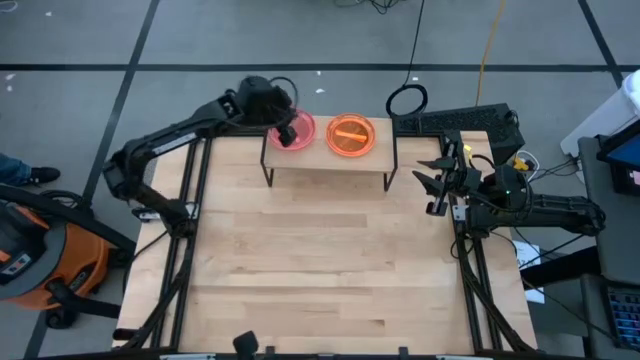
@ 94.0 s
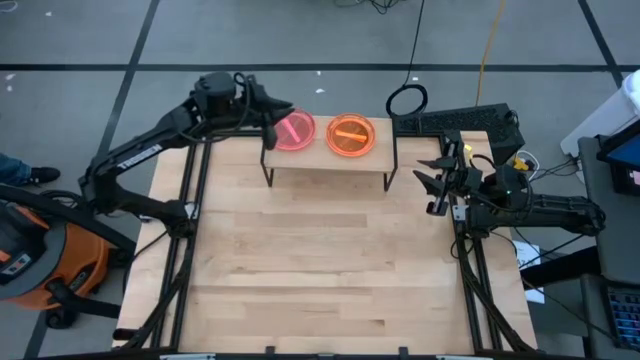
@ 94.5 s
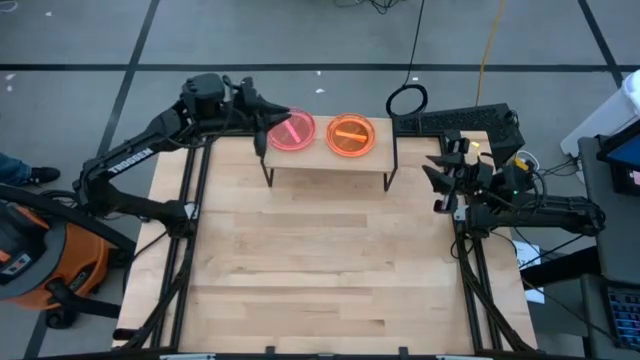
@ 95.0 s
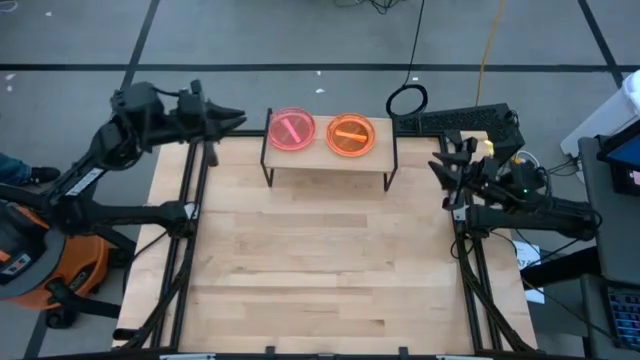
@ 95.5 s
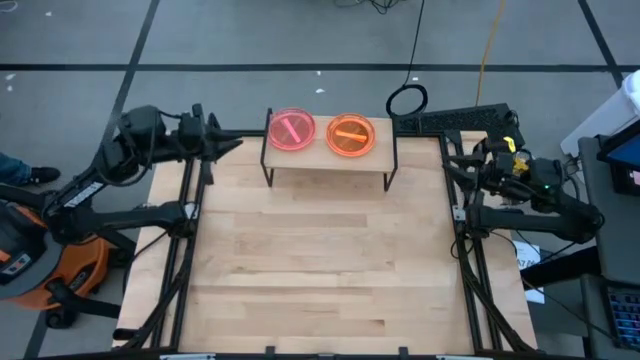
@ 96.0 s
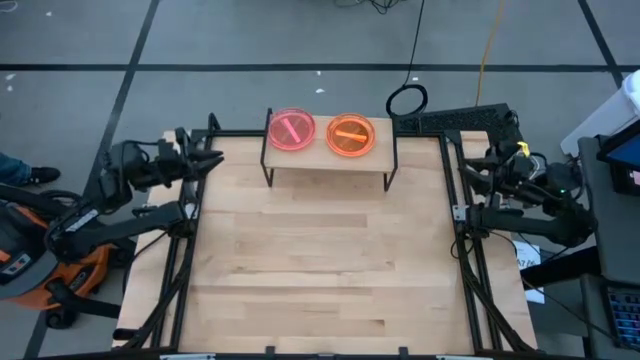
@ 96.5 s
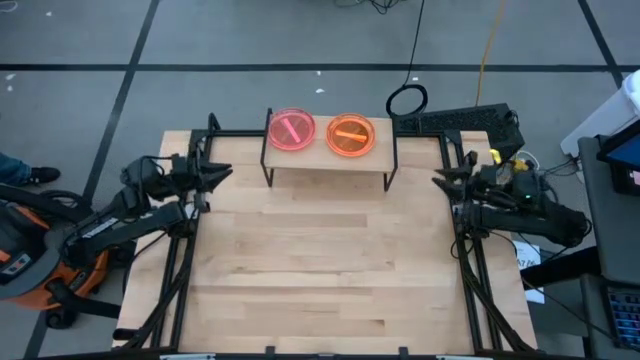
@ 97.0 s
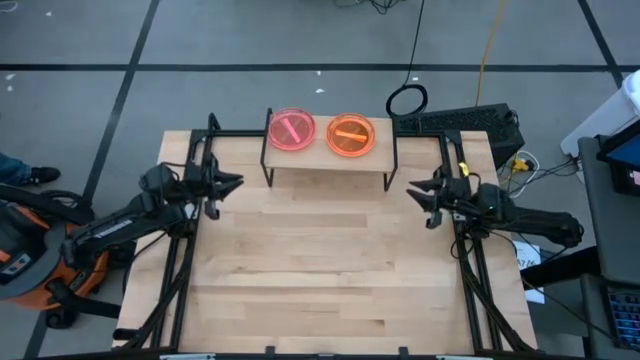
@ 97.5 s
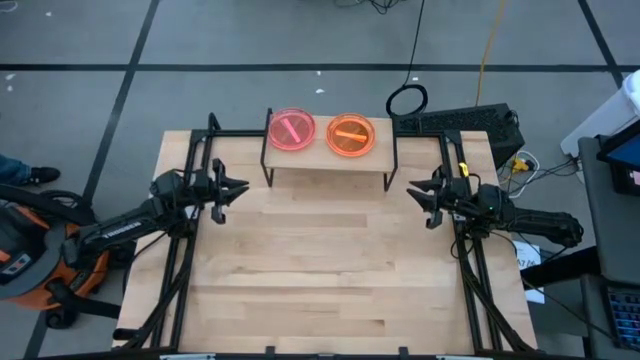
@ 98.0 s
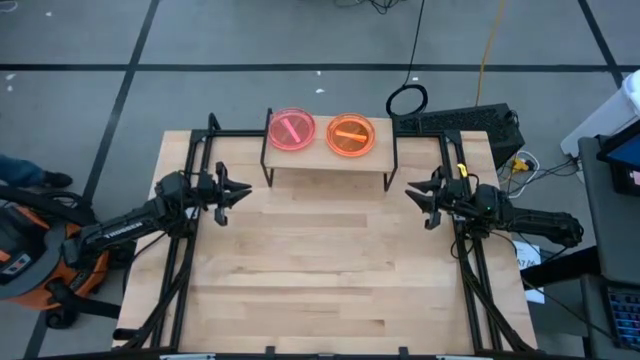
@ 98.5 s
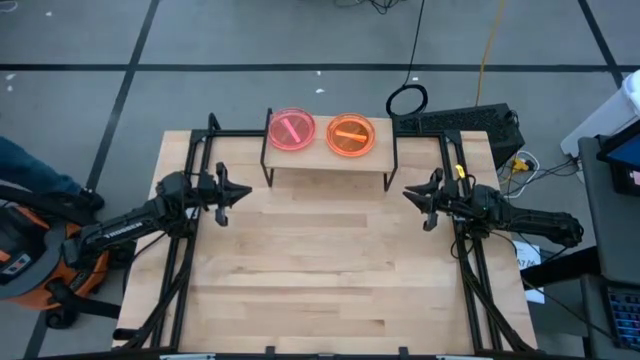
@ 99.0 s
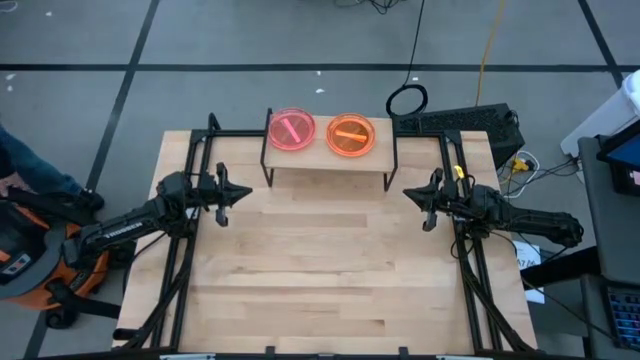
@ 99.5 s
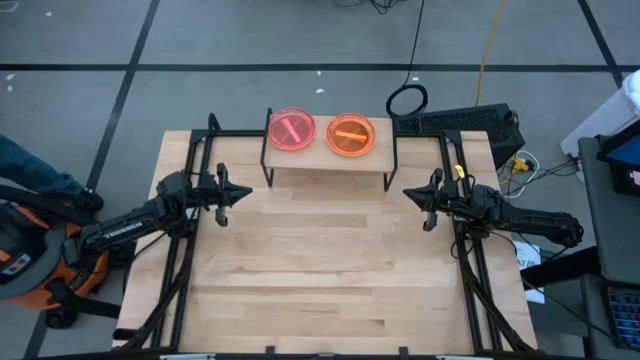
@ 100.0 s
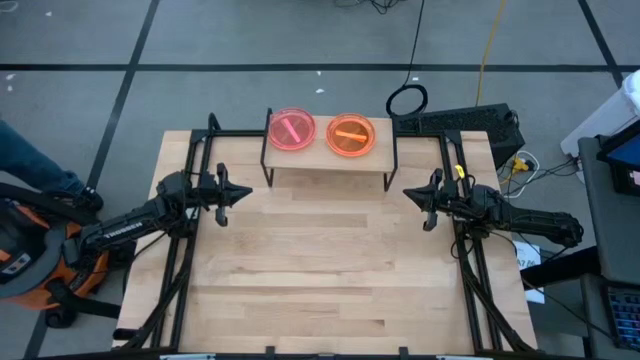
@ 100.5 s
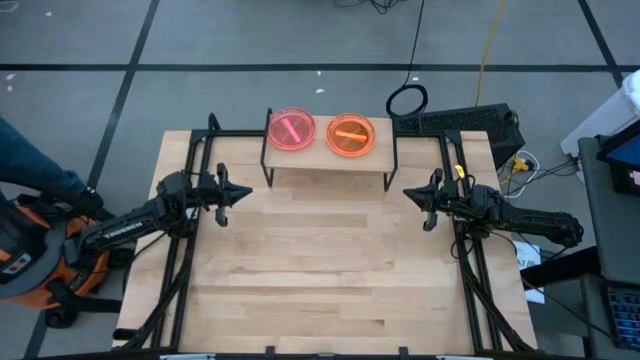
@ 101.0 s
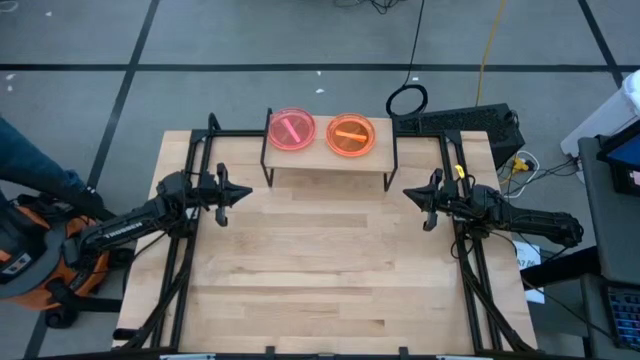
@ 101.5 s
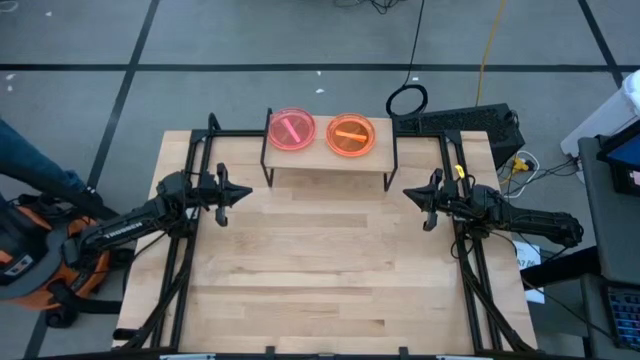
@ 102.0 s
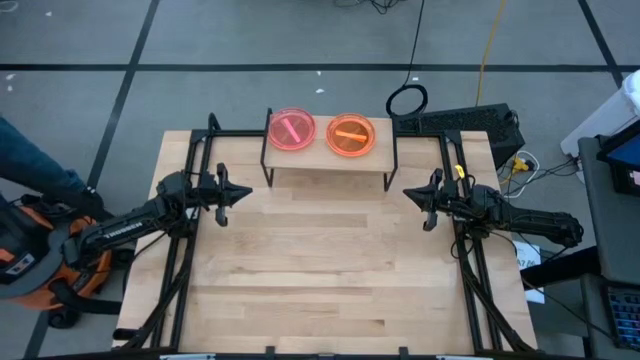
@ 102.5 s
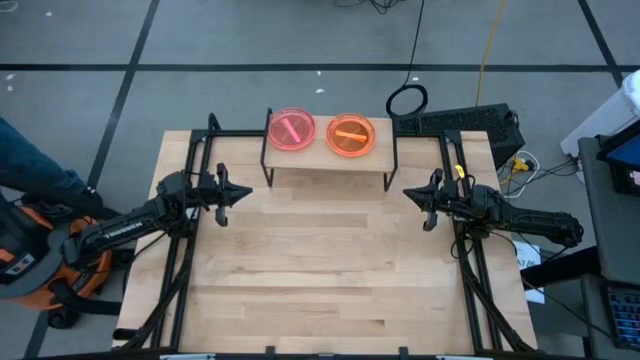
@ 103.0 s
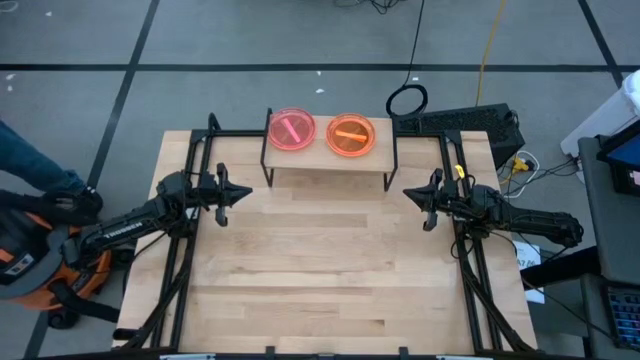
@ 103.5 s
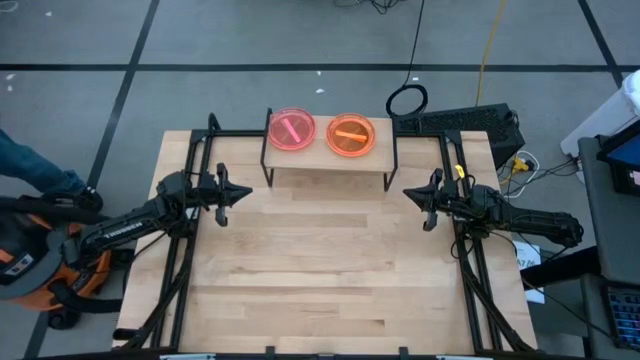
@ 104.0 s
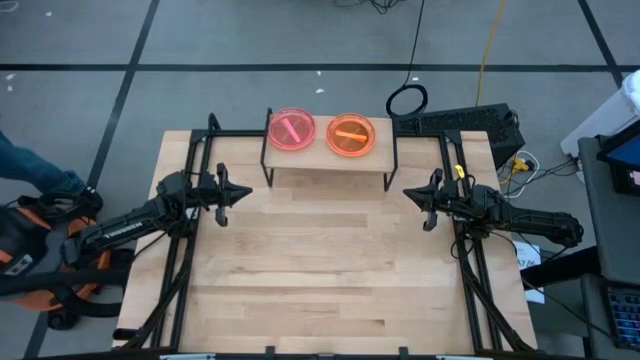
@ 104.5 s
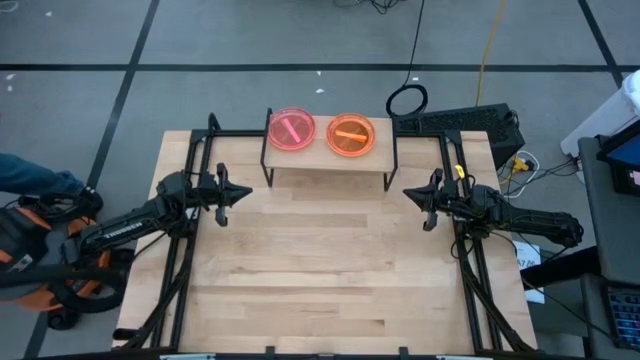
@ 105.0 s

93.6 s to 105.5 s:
Task: Place and stack plates onto a shelf
Return to Home Position

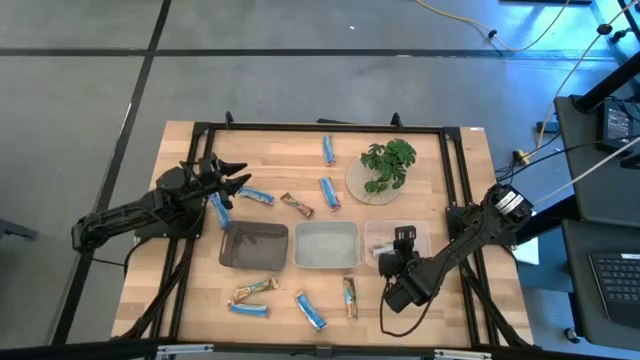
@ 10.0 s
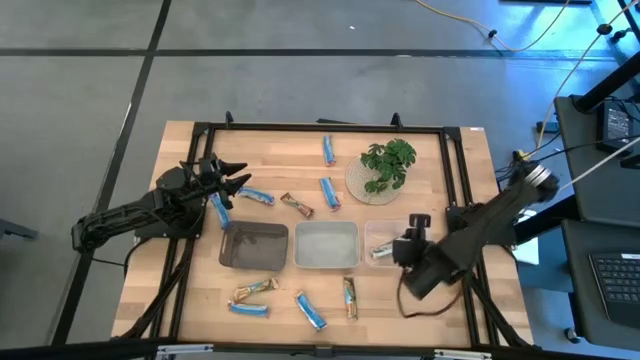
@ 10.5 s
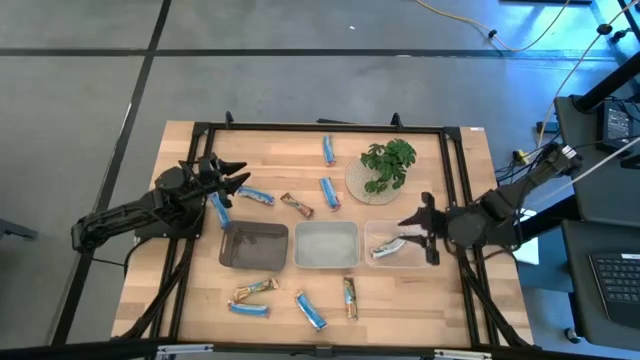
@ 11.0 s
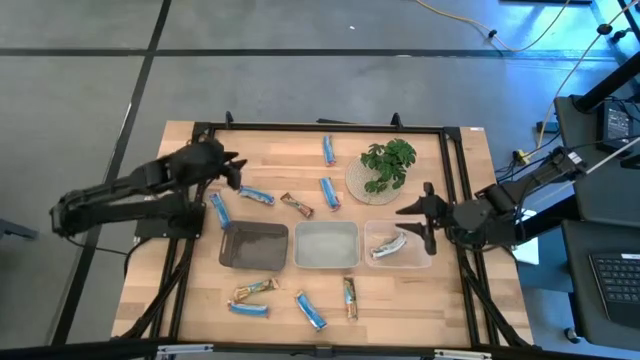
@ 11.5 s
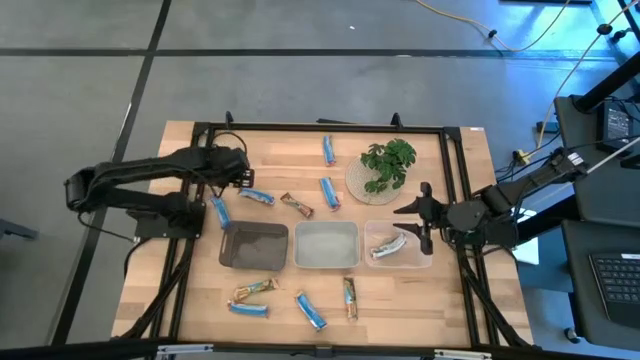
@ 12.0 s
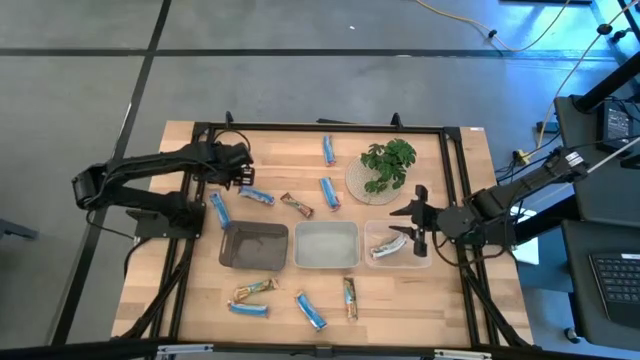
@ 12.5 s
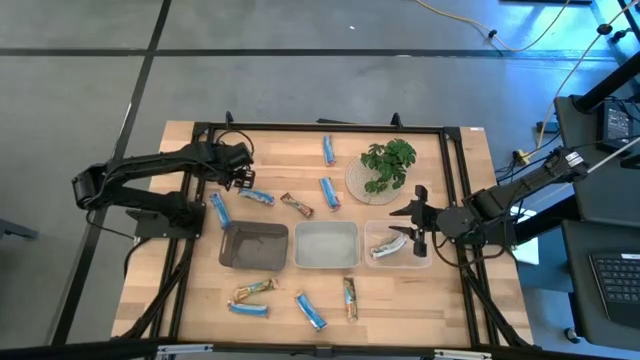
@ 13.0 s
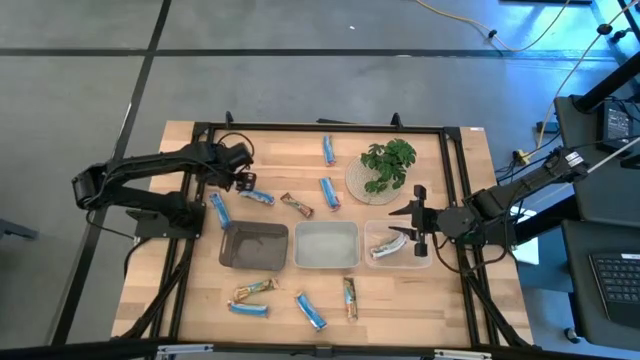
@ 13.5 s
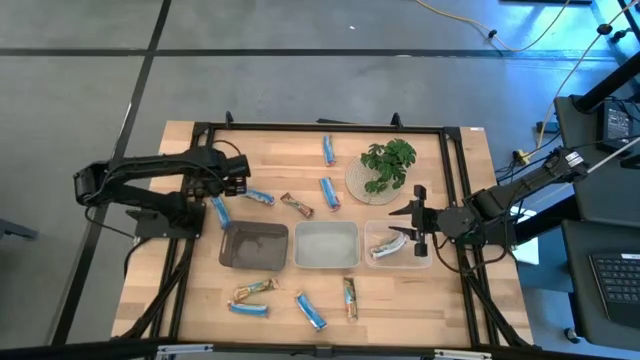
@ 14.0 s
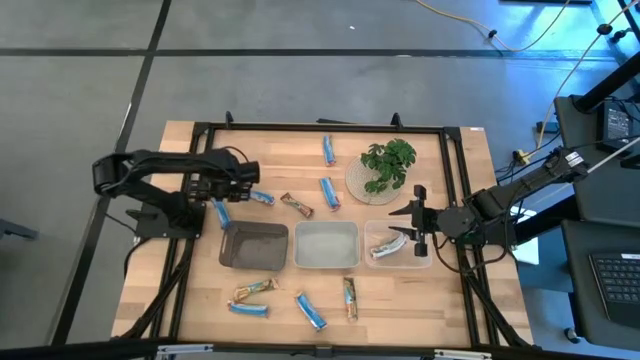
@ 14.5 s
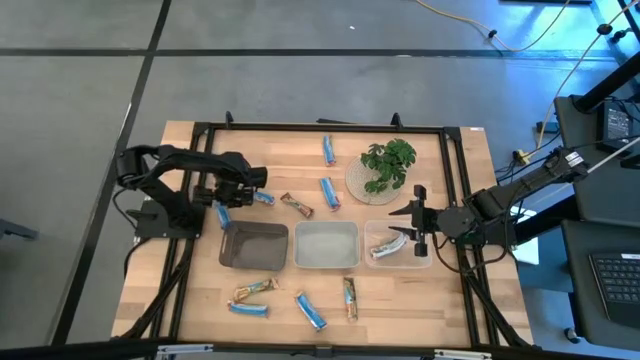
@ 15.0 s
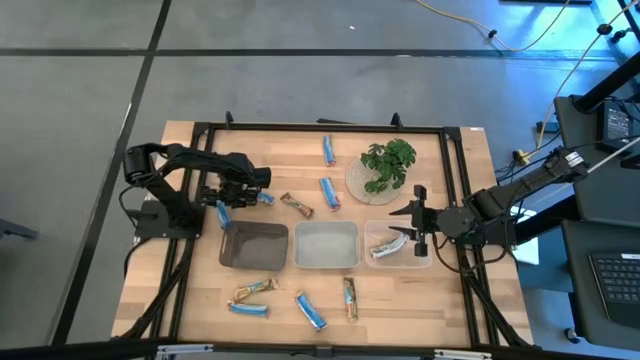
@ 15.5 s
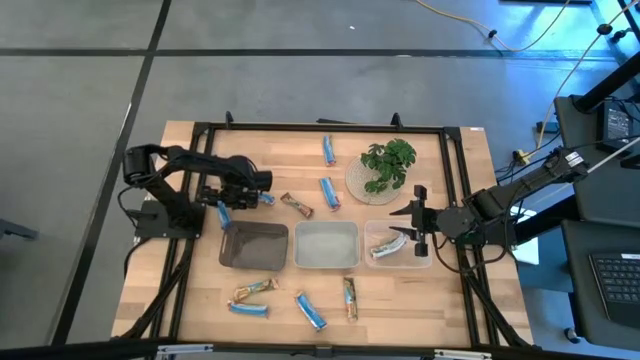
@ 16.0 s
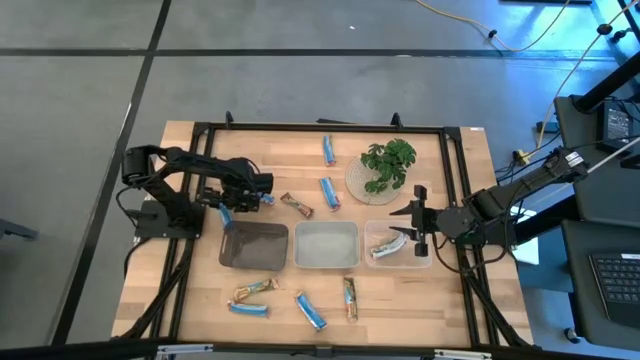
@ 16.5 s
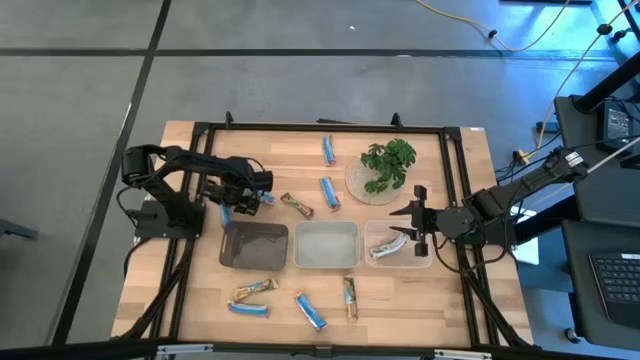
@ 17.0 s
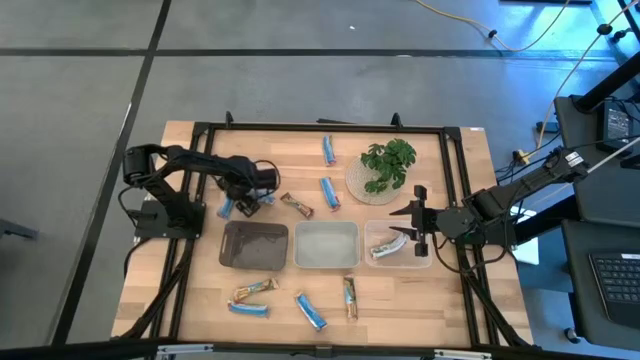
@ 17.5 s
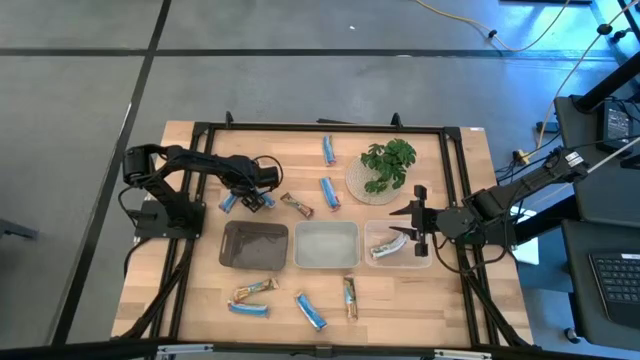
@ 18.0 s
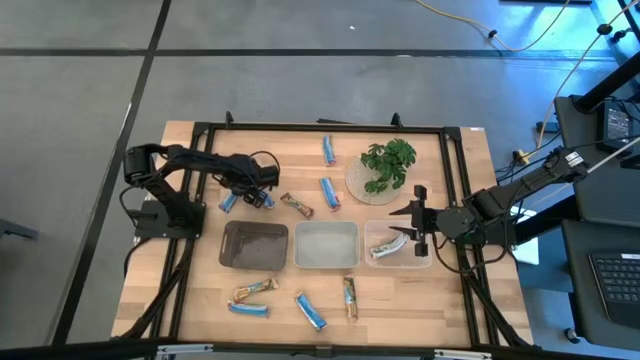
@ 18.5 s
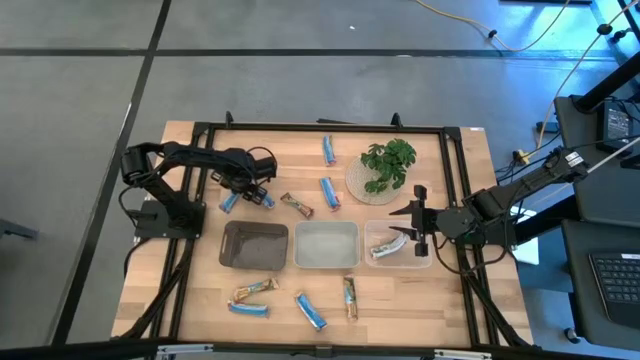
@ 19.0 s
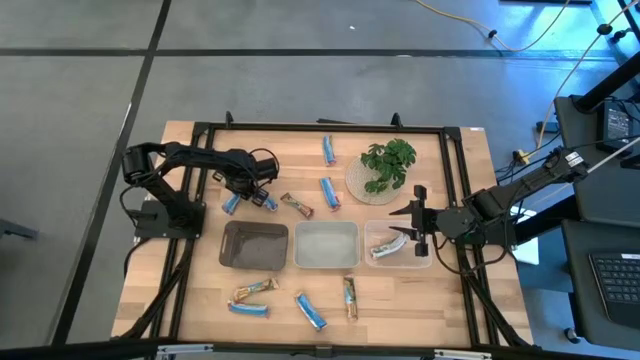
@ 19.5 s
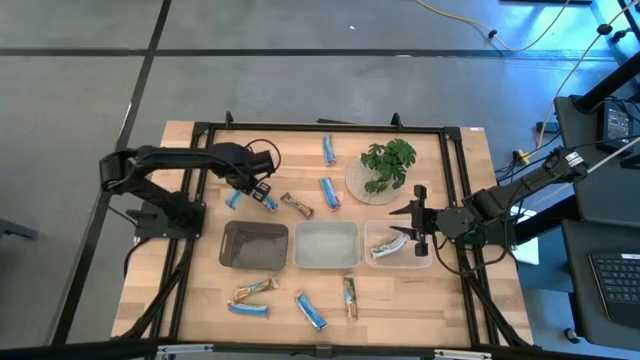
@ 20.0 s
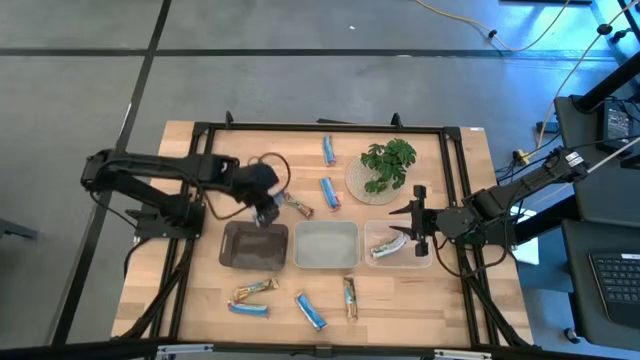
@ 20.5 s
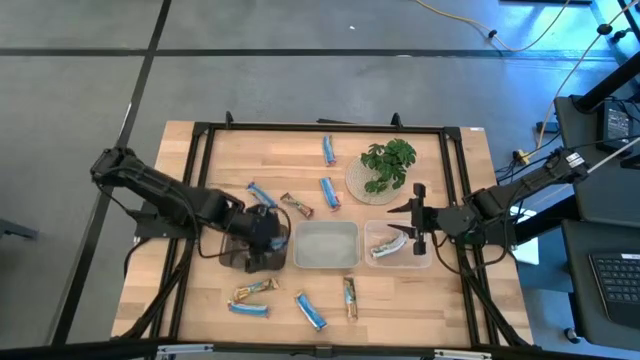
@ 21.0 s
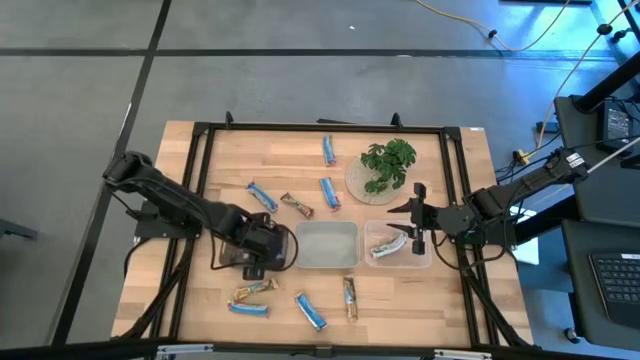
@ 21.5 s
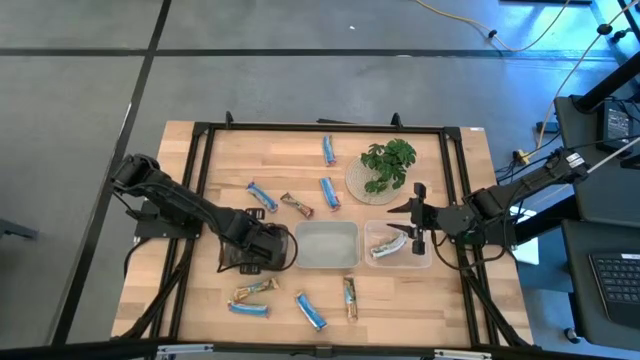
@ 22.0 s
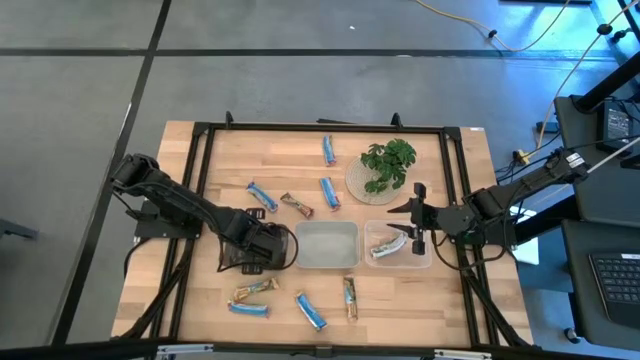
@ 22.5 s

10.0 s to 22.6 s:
Task: Pick and place Granola Bars by type
Put the blue granola bar into the black bin
